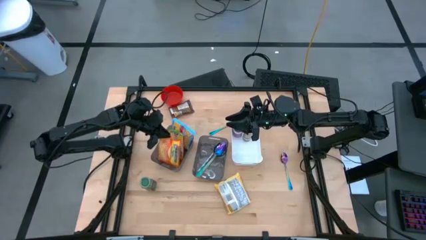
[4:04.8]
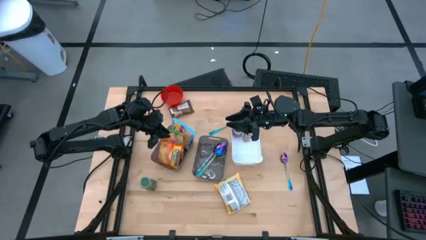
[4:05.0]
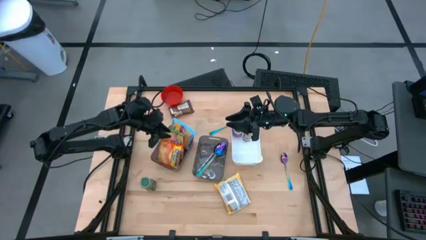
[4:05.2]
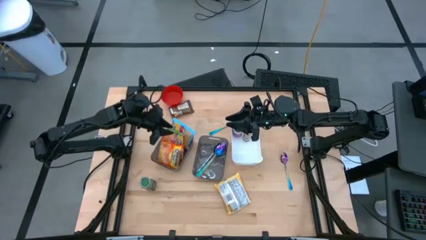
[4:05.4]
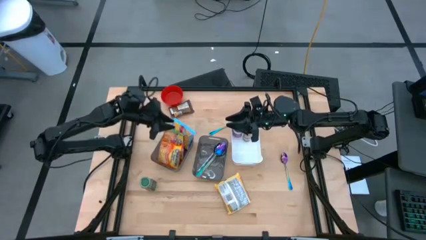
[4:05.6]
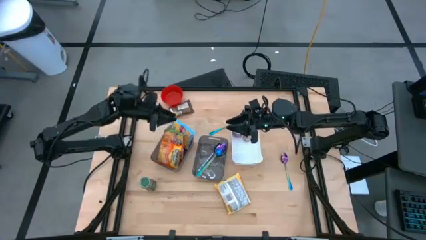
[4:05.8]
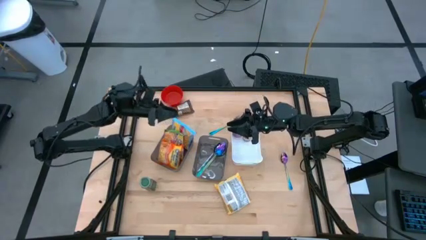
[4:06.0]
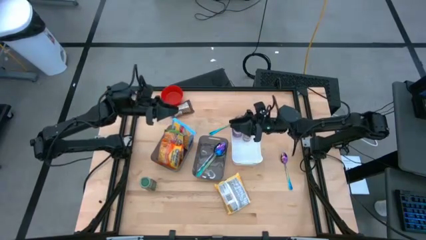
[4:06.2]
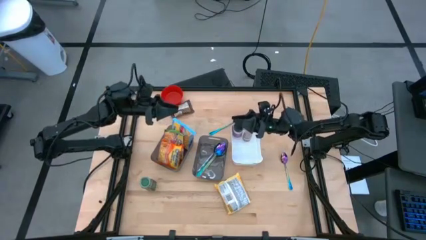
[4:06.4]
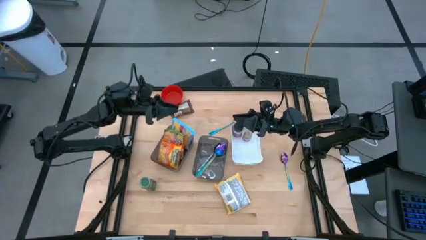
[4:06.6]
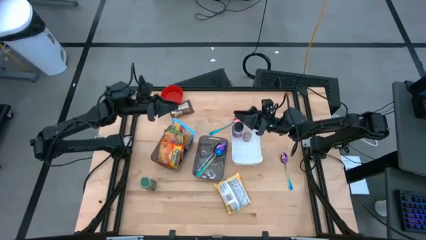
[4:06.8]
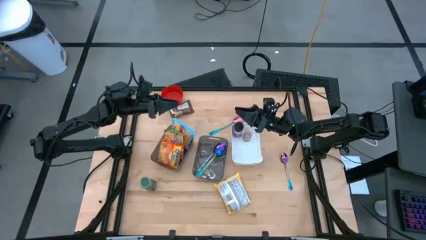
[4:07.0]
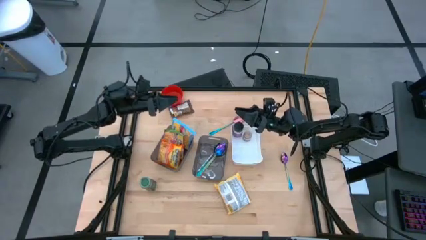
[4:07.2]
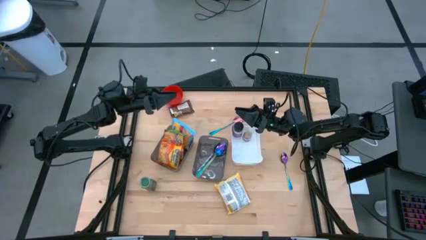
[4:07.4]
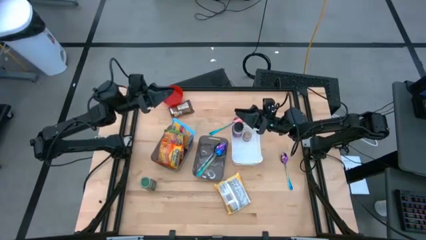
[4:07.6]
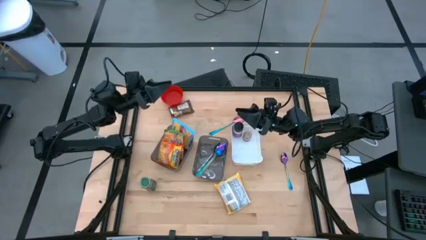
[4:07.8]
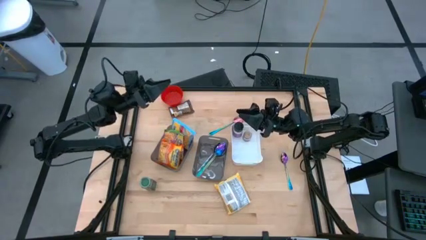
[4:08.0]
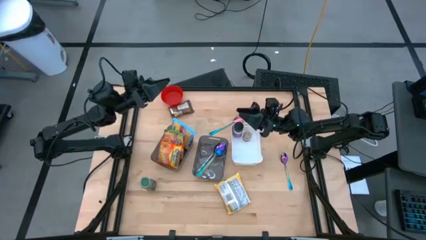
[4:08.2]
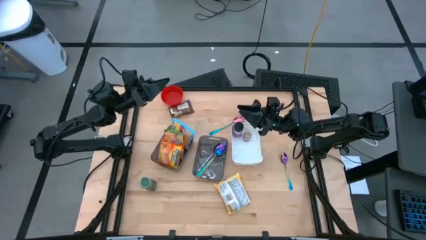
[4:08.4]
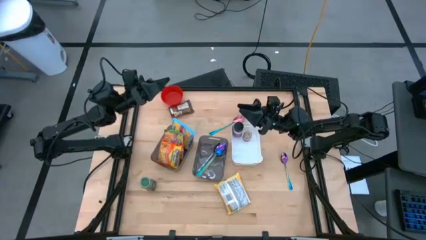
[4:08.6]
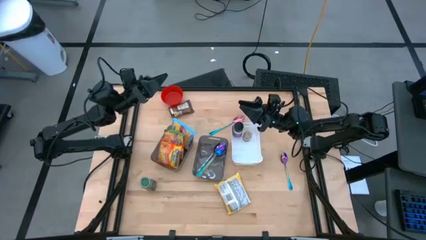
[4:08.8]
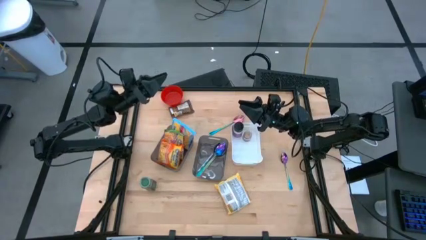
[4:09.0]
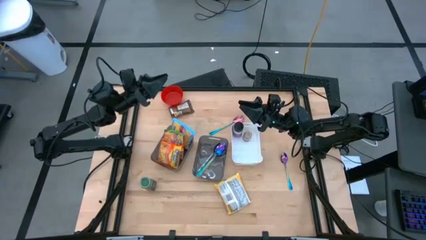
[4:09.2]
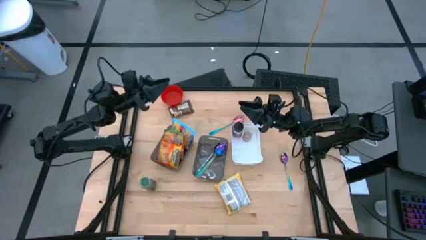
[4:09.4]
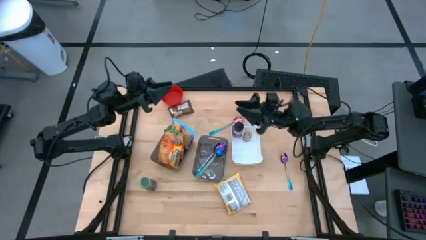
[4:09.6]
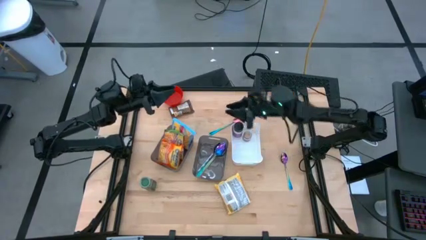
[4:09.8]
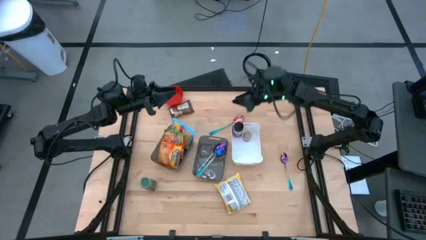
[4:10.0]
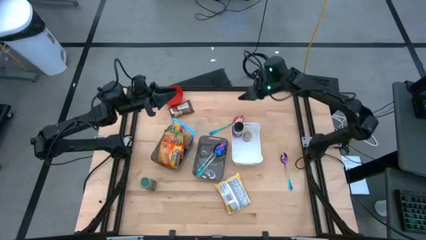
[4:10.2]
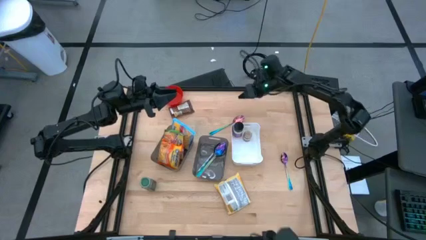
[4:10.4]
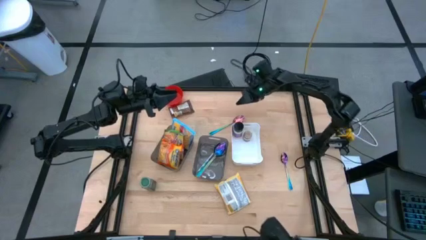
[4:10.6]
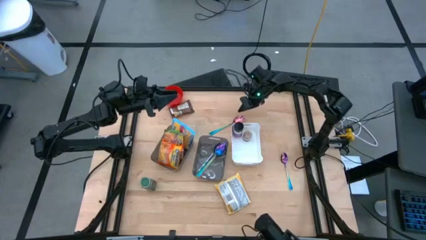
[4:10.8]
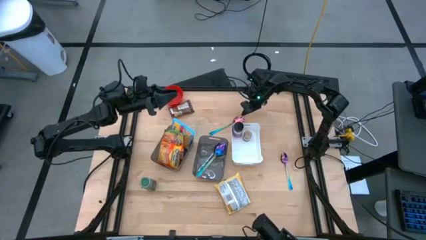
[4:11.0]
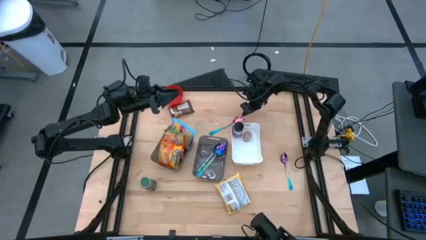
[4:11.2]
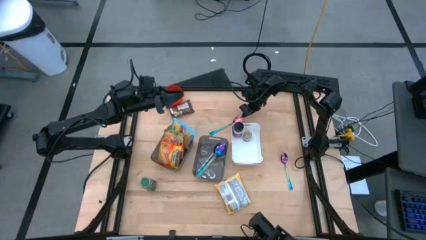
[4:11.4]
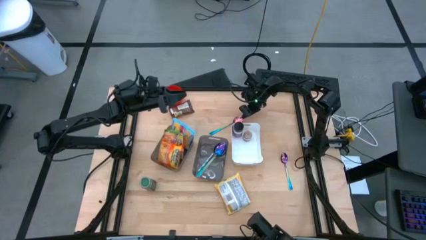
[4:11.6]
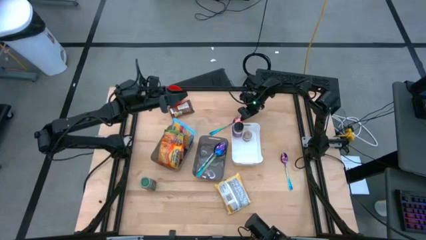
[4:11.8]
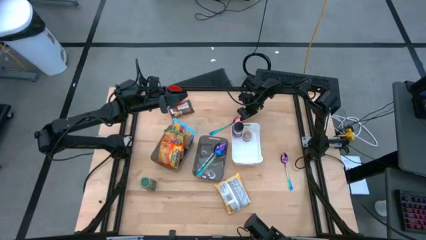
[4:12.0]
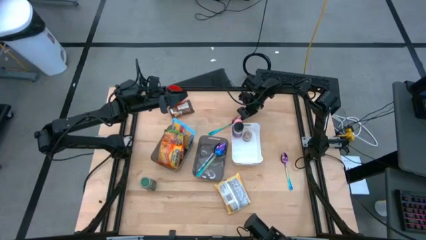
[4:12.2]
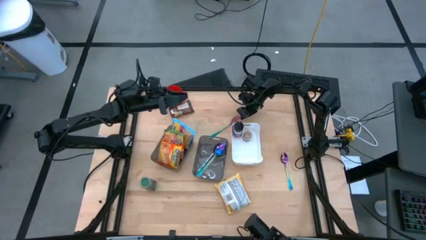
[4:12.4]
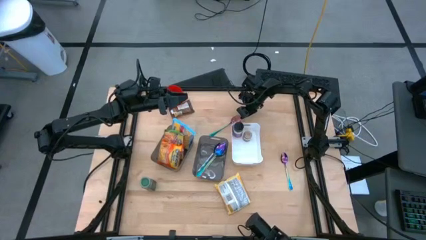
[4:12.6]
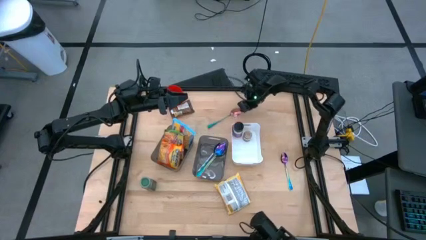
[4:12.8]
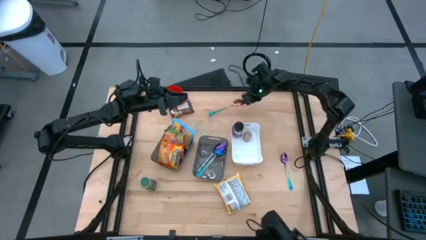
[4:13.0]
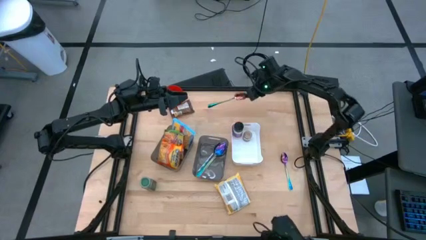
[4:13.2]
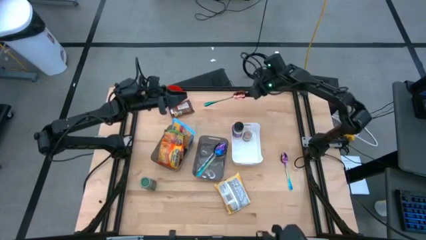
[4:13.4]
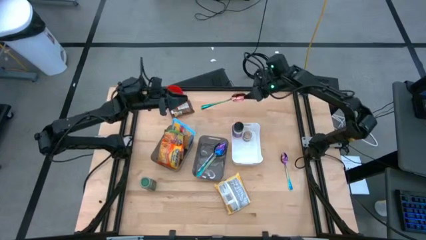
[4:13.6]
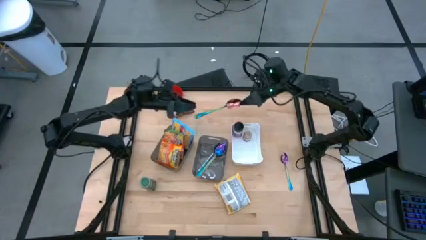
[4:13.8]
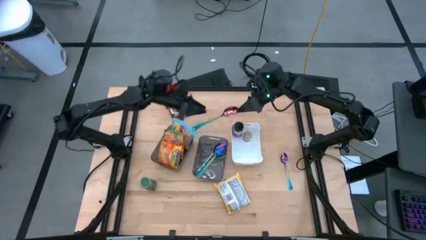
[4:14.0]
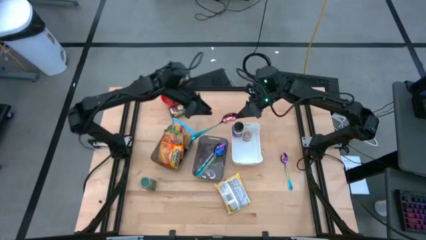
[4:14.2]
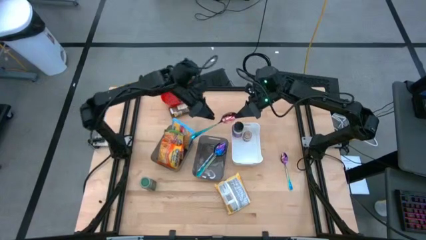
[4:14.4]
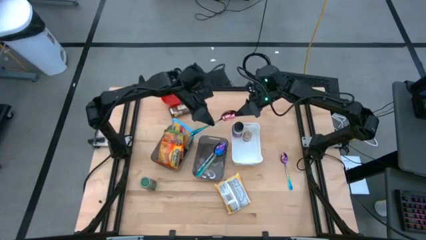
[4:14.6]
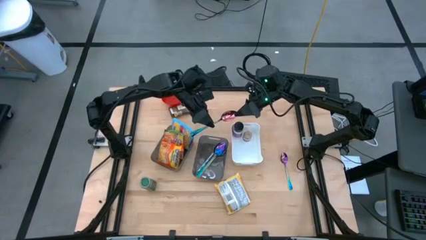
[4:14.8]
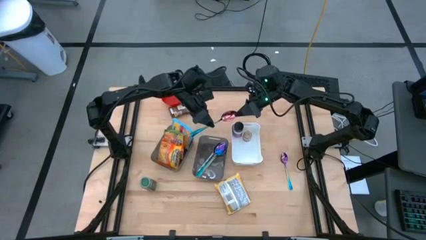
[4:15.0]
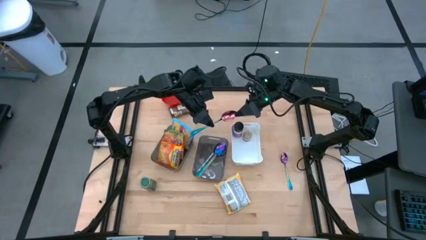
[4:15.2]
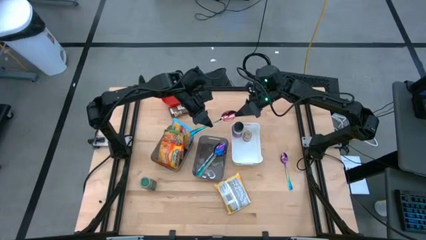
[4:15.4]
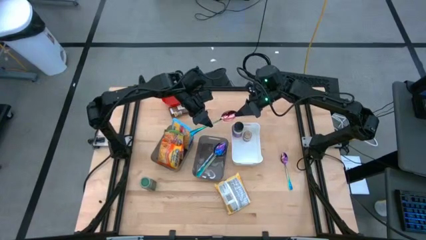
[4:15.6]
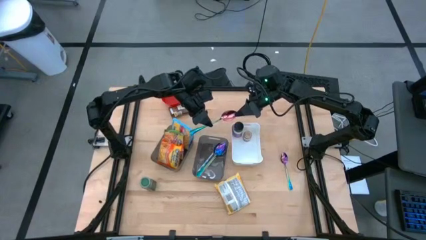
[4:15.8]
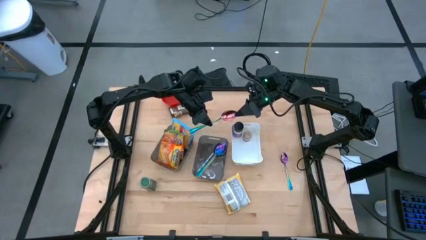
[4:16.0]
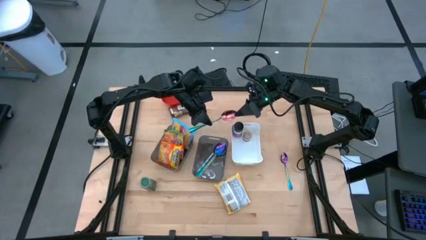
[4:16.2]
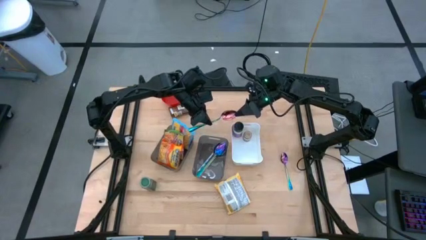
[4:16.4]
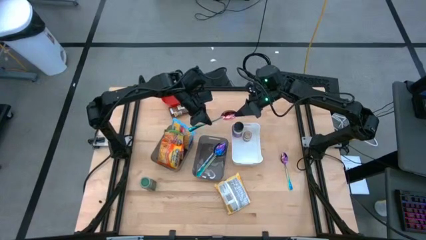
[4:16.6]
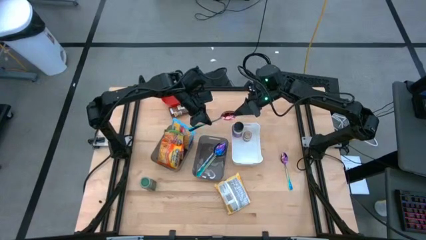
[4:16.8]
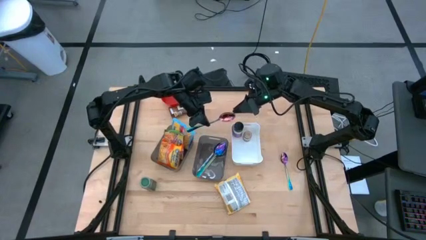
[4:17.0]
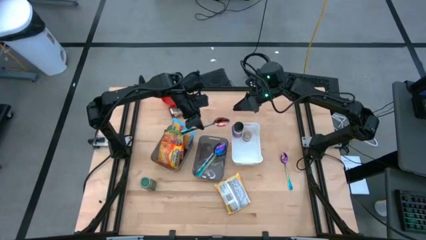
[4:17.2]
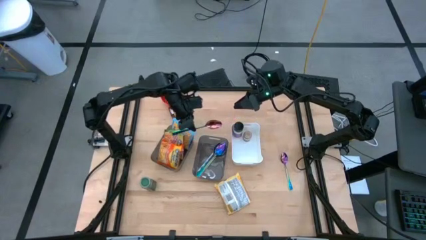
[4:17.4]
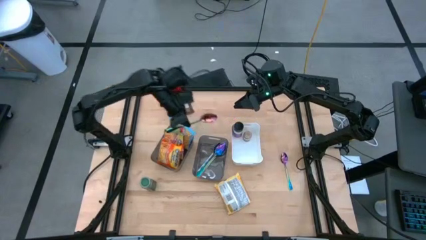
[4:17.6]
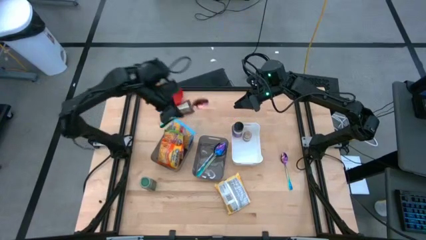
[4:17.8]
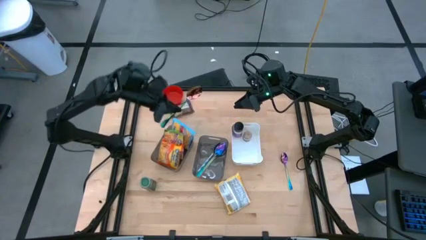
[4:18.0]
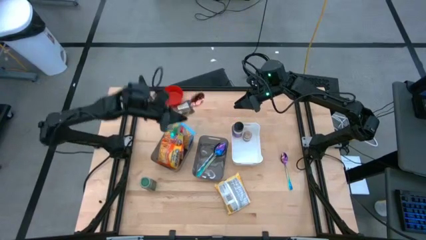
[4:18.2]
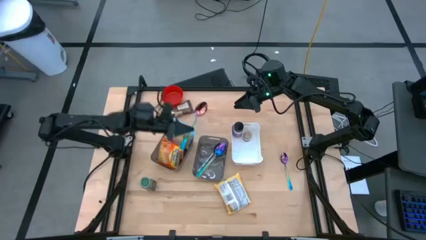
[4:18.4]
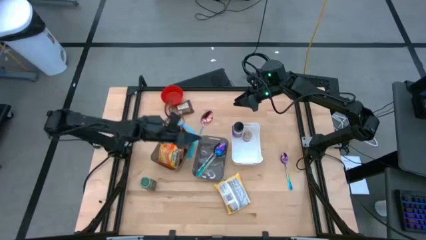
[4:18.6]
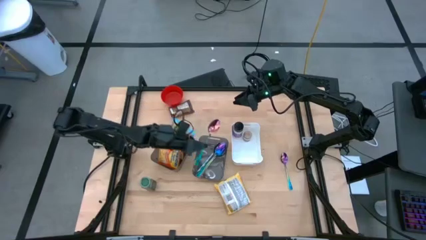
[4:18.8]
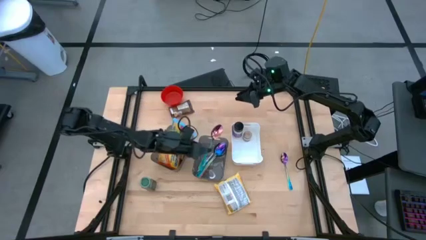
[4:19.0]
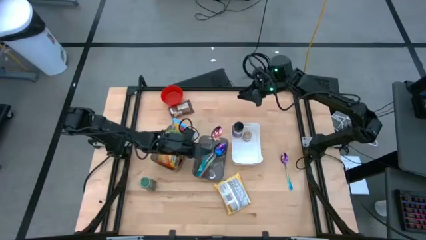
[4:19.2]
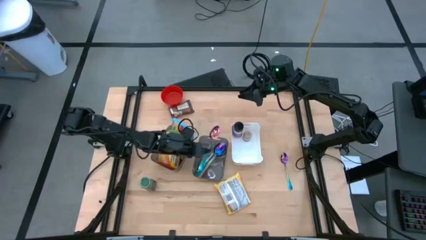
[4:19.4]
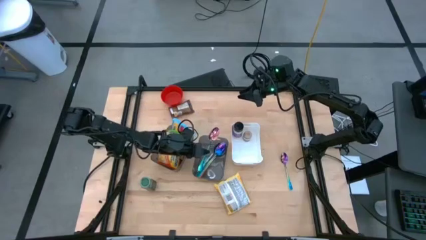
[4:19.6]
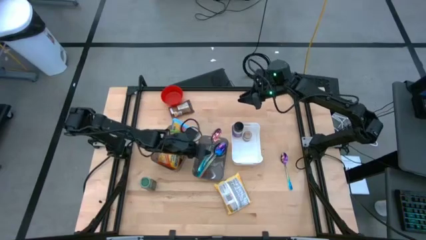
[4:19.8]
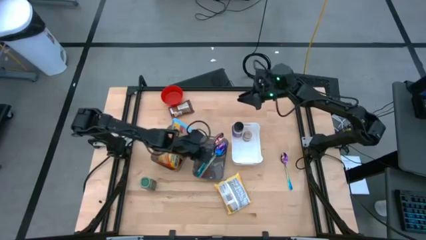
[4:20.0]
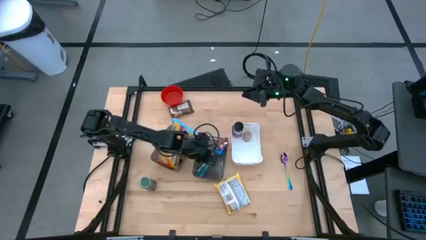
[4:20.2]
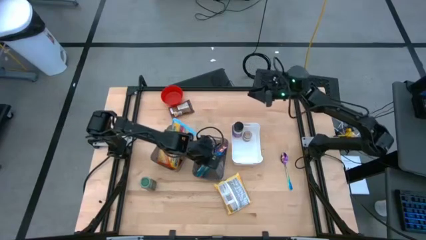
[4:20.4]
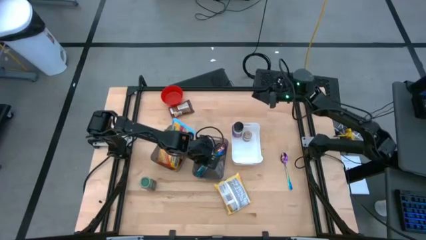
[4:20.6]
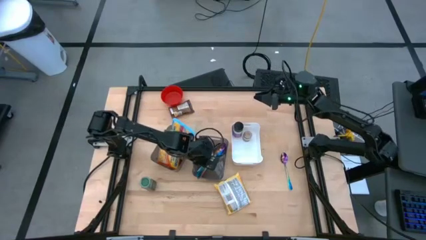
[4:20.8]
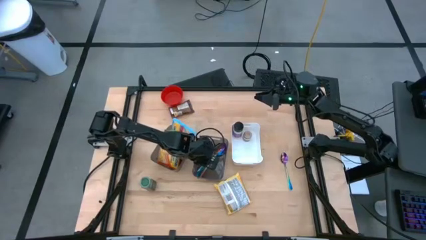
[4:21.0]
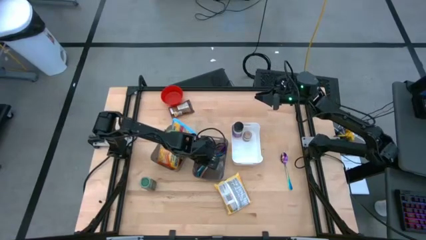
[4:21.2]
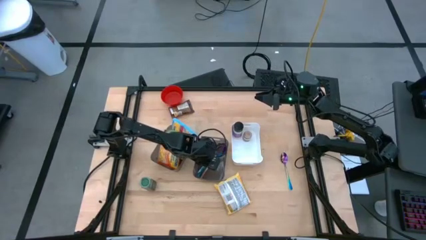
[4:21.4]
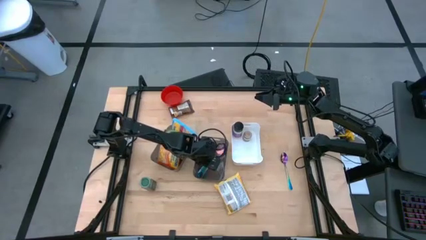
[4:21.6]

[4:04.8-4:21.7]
Task: Pick & Place Food Item
Put the blue spoon into the right gray bin
